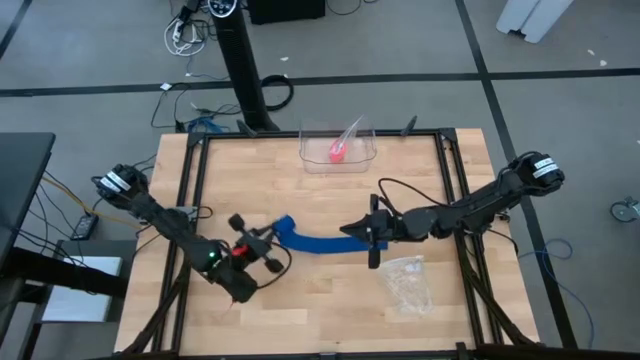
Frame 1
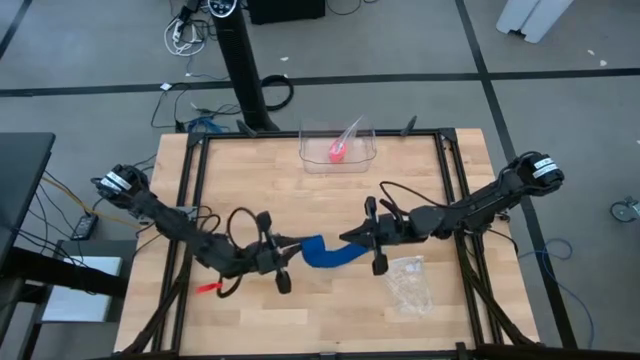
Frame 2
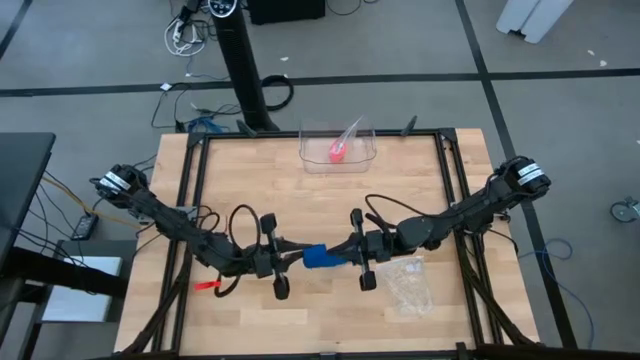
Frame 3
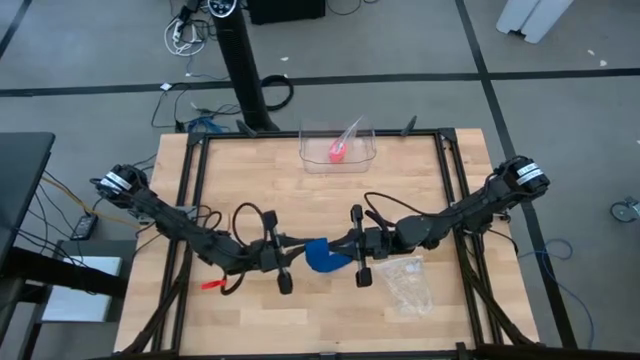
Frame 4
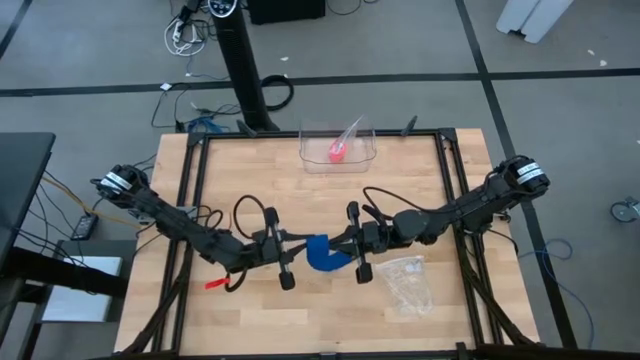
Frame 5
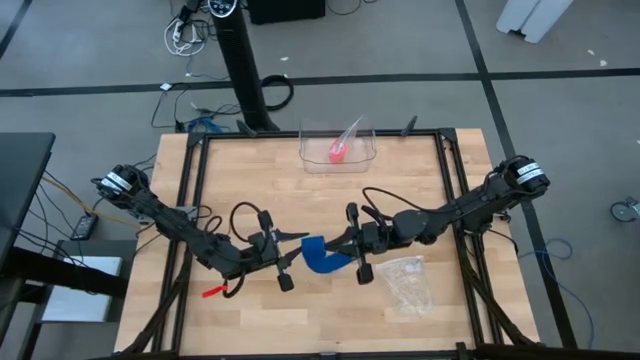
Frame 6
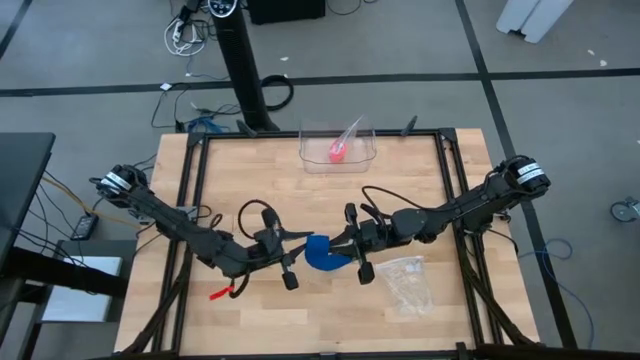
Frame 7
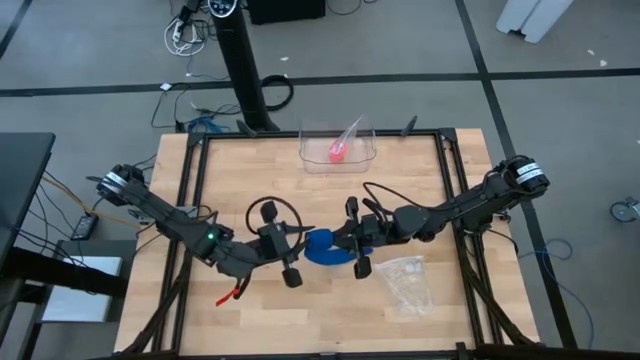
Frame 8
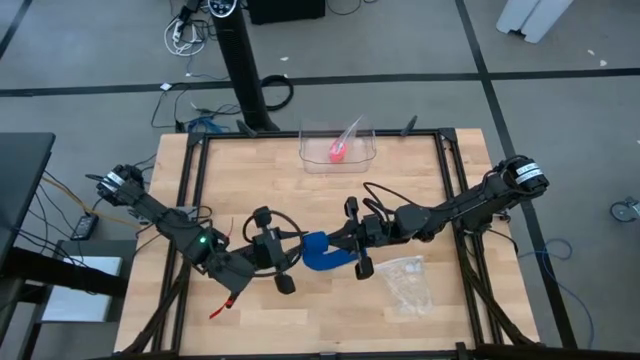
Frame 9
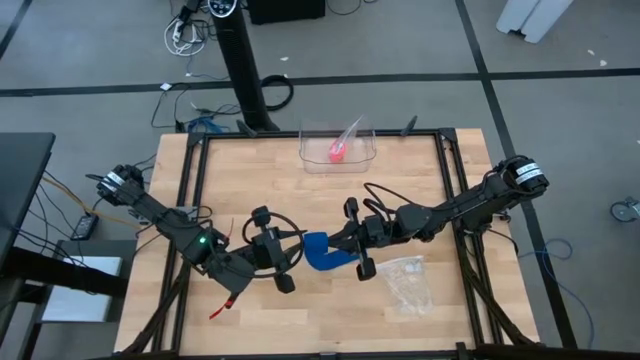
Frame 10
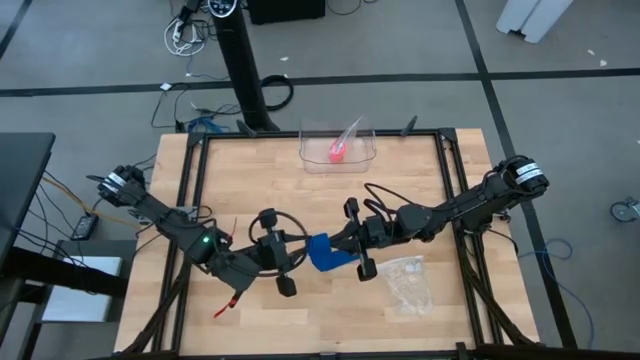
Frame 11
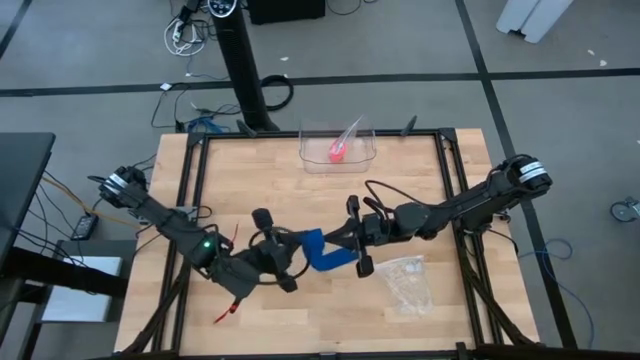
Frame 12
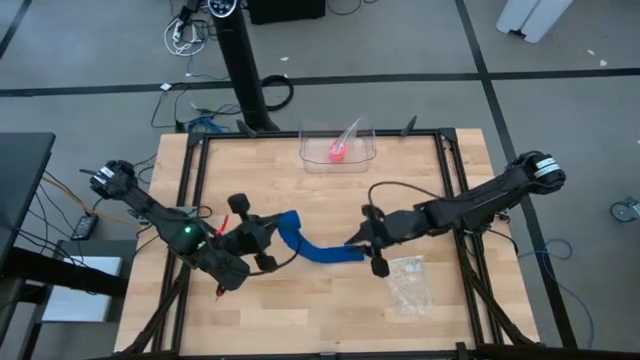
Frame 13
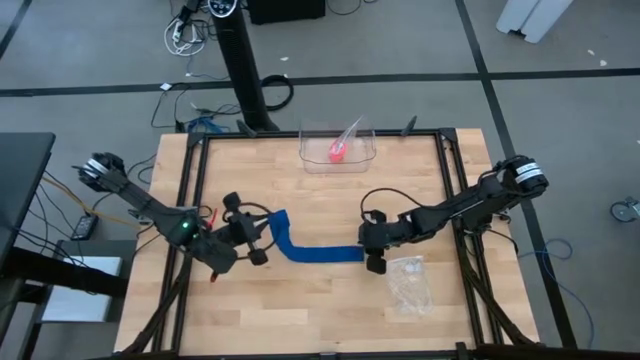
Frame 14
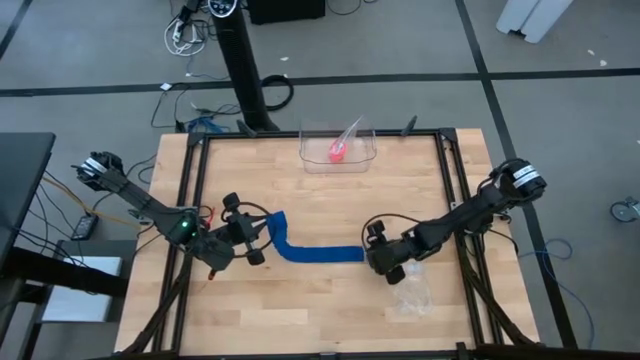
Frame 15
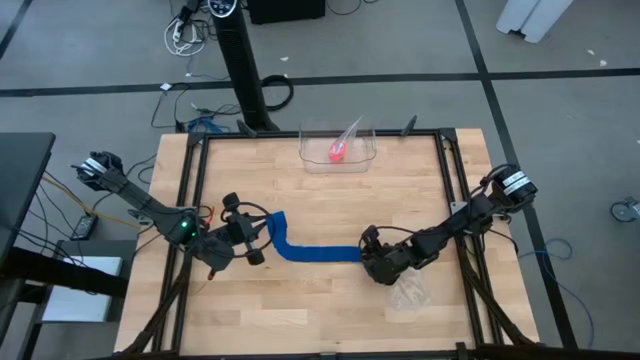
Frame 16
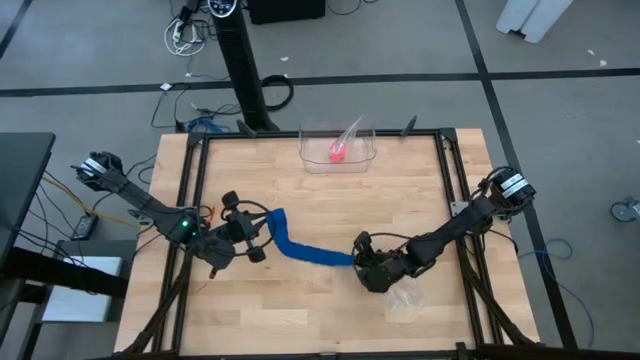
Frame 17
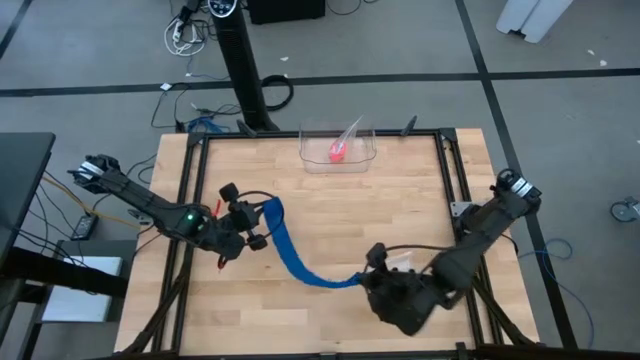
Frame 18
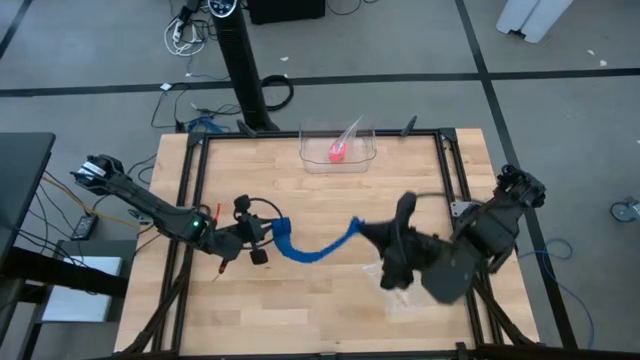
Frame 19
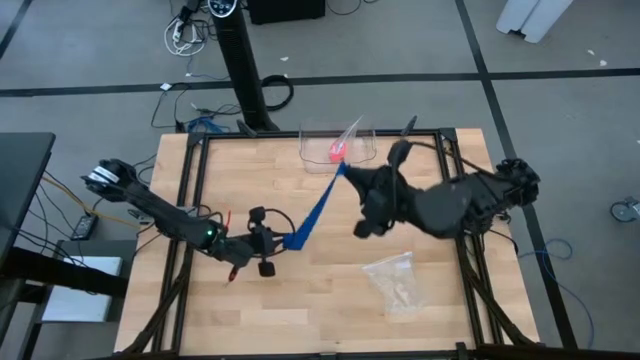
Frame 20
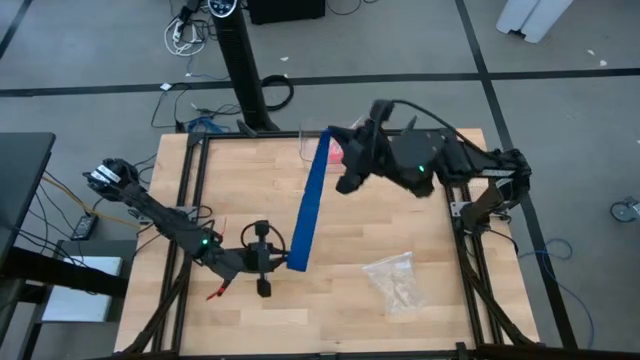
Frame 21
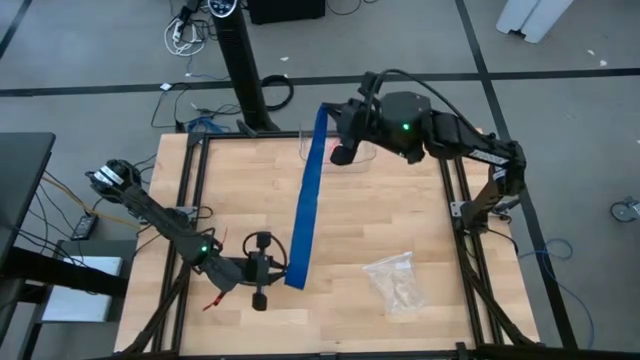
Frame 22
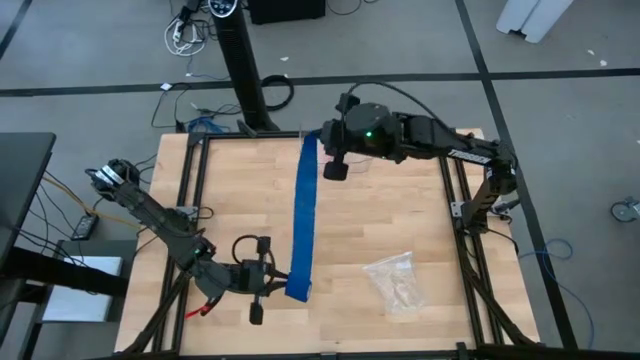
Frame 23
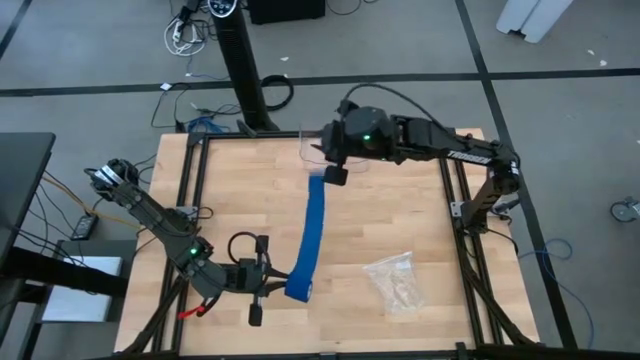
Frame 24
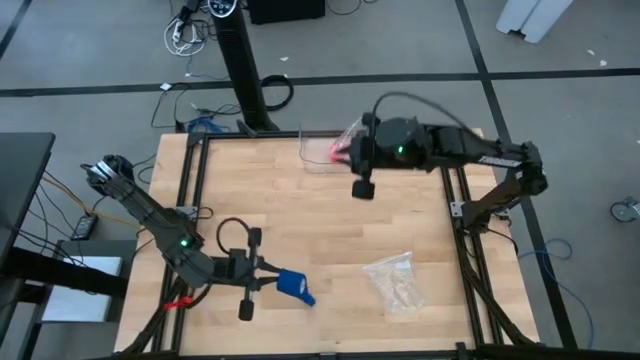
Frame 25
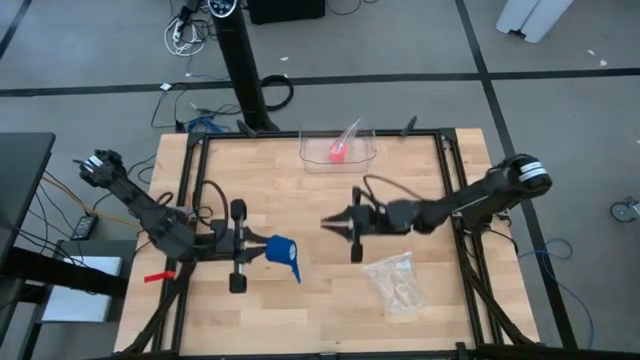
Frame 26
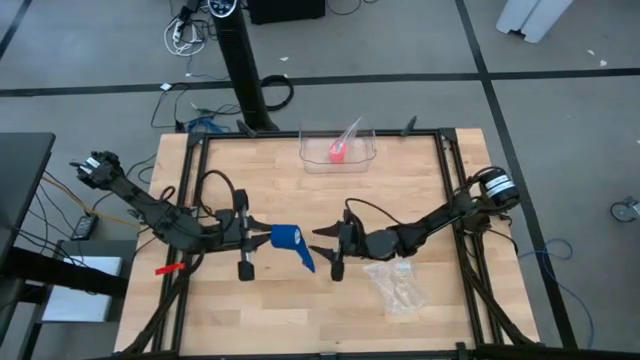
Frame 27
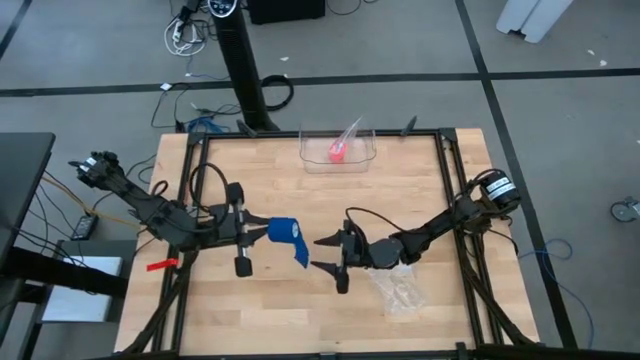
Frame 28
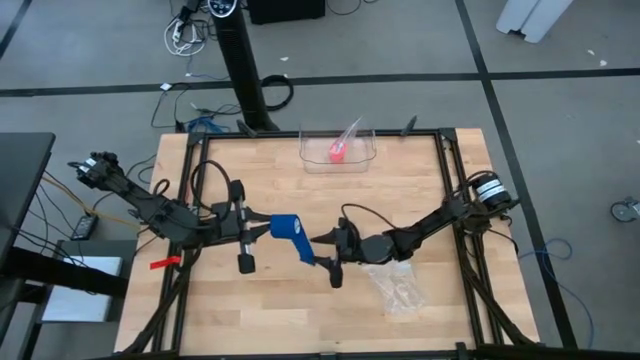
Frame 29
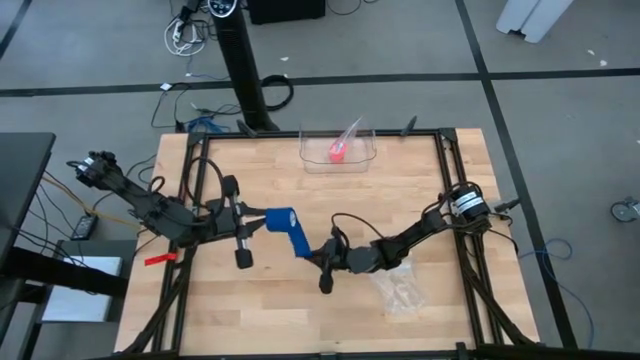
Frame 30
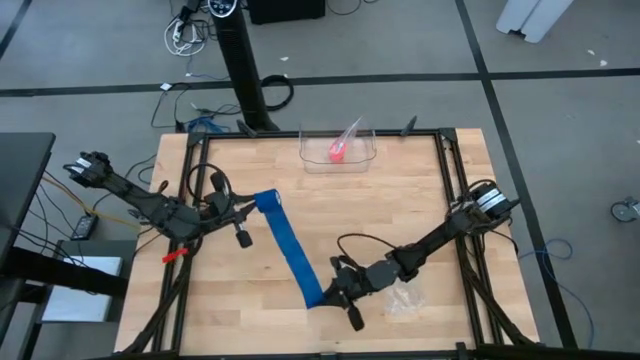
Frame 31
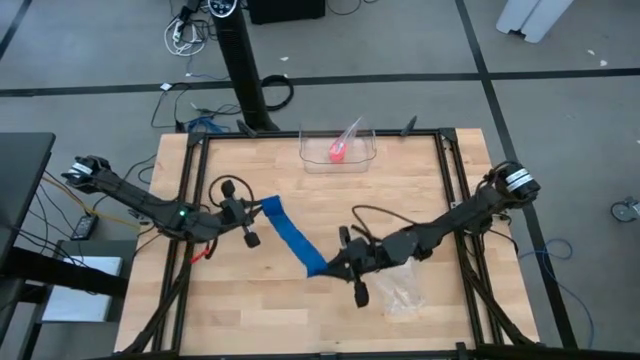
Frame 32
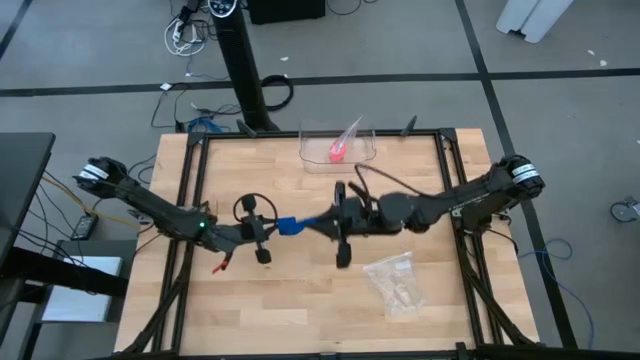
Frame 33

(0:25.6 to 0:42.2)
Task: Roll bandage
Roll the blue bandage
